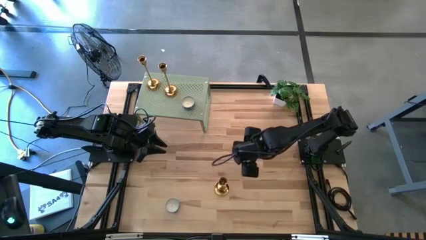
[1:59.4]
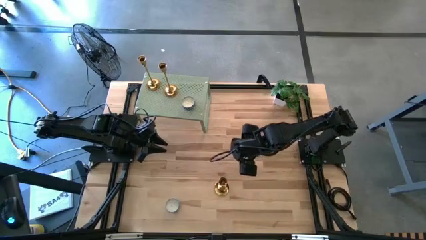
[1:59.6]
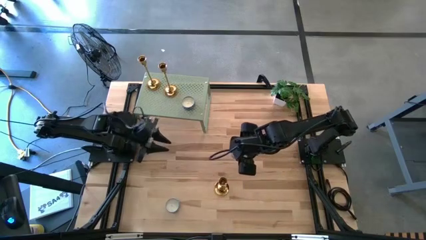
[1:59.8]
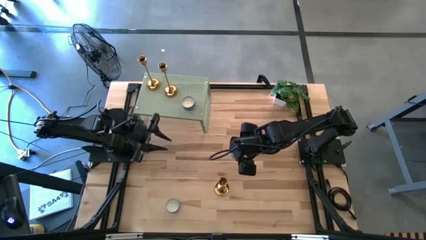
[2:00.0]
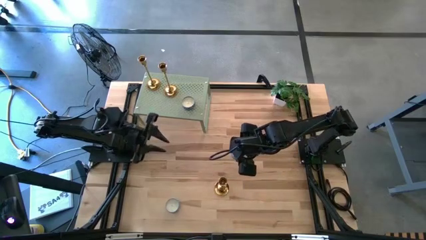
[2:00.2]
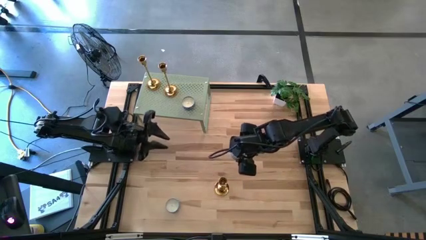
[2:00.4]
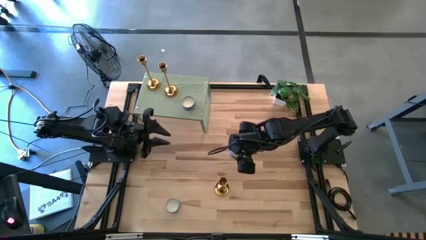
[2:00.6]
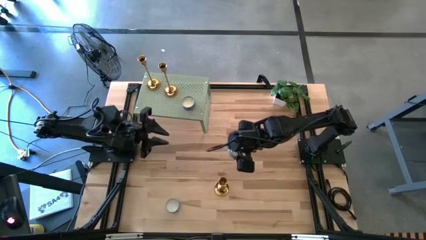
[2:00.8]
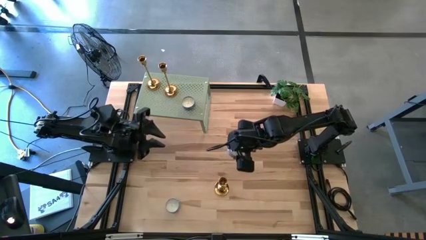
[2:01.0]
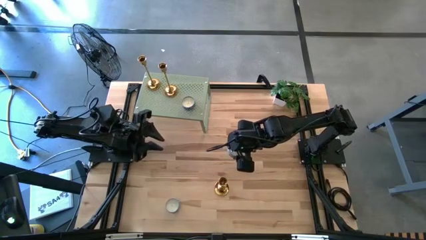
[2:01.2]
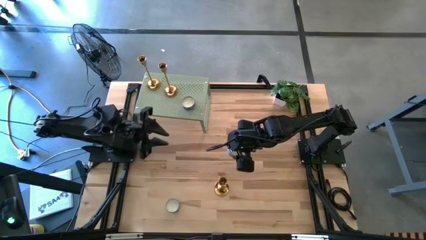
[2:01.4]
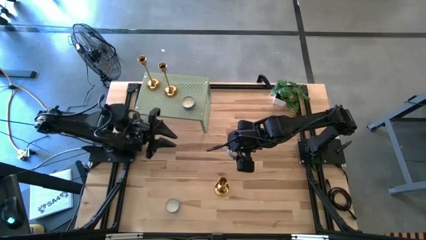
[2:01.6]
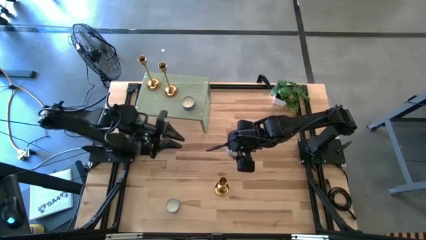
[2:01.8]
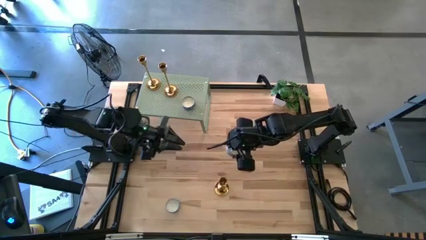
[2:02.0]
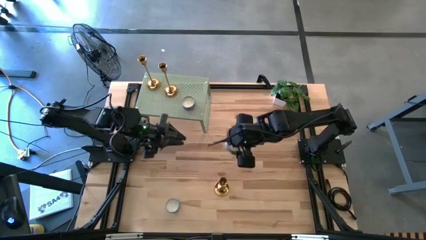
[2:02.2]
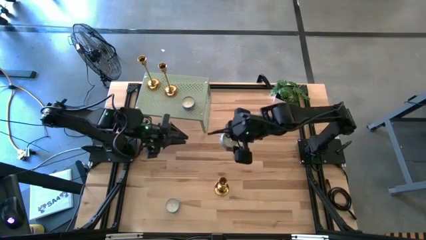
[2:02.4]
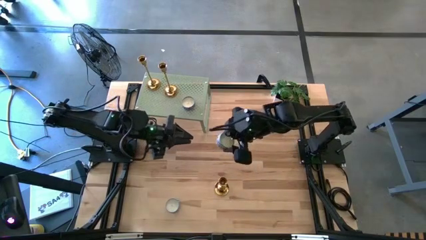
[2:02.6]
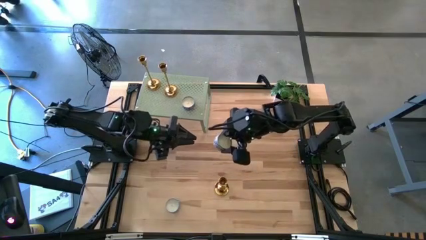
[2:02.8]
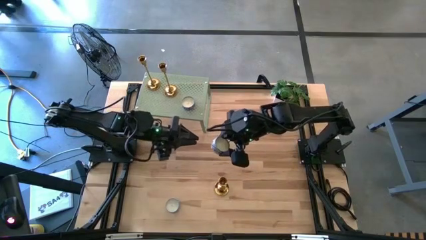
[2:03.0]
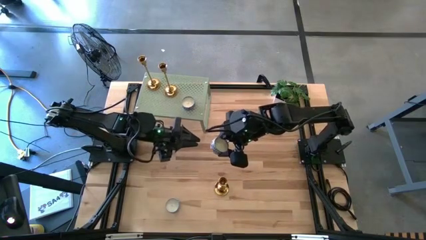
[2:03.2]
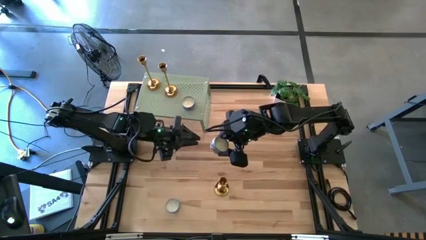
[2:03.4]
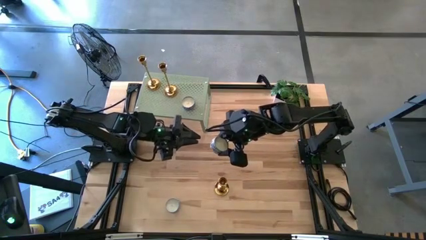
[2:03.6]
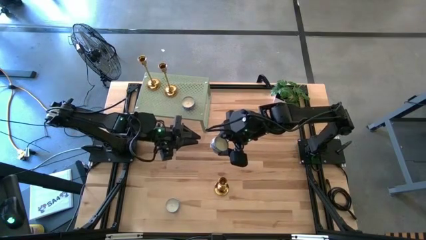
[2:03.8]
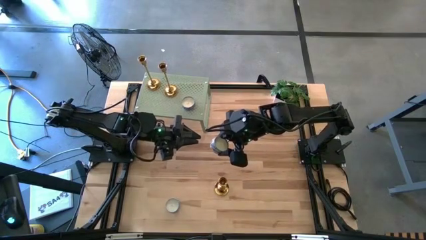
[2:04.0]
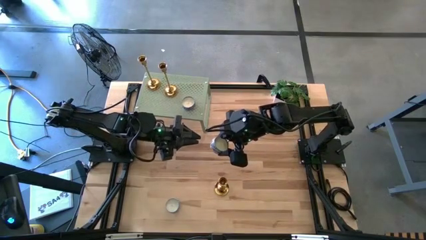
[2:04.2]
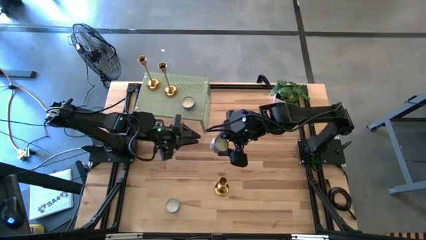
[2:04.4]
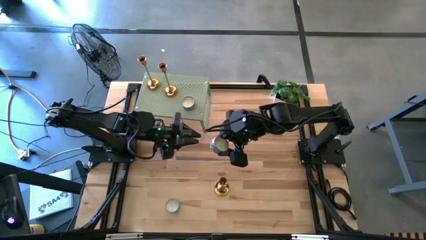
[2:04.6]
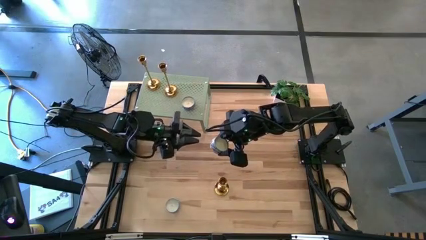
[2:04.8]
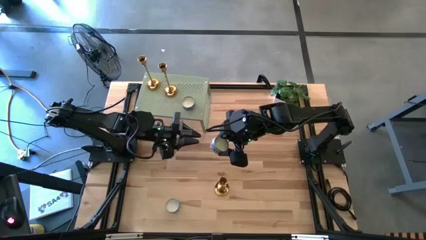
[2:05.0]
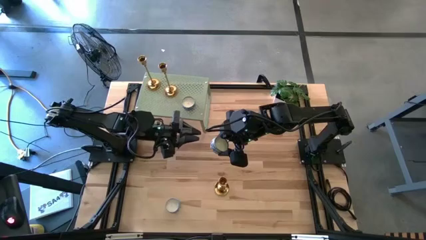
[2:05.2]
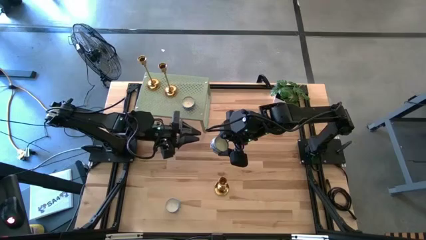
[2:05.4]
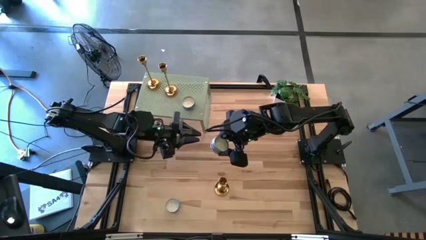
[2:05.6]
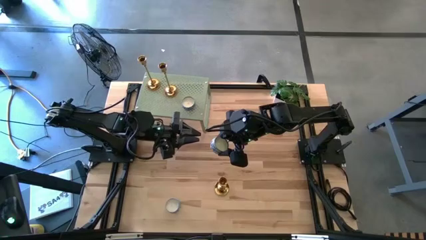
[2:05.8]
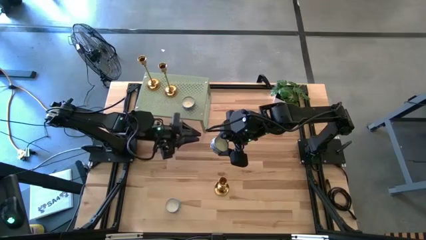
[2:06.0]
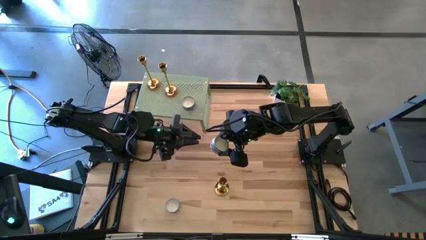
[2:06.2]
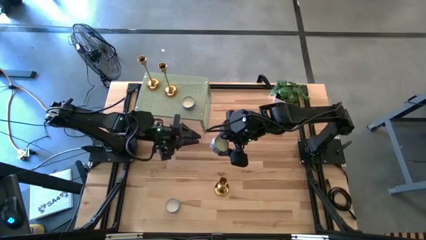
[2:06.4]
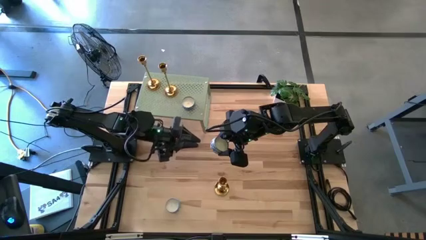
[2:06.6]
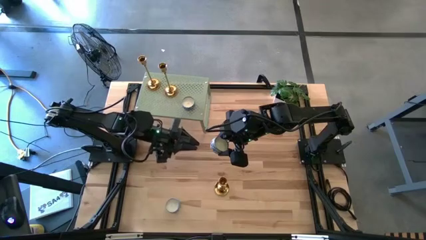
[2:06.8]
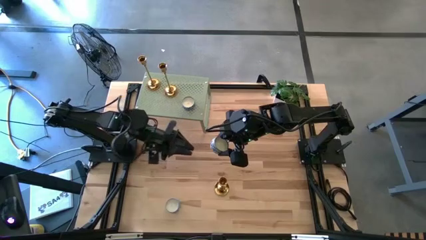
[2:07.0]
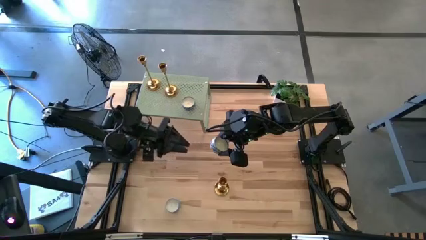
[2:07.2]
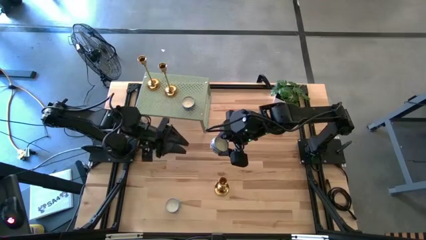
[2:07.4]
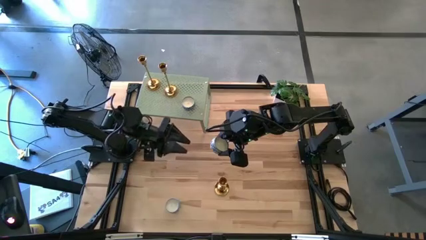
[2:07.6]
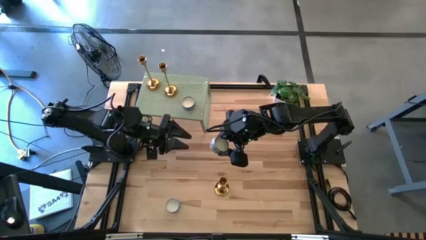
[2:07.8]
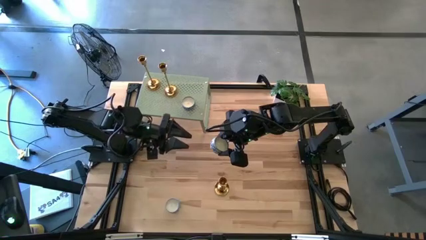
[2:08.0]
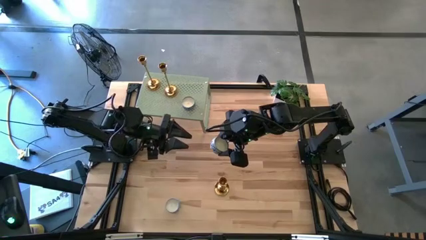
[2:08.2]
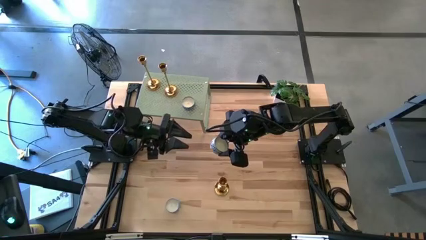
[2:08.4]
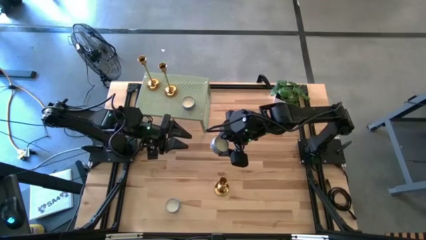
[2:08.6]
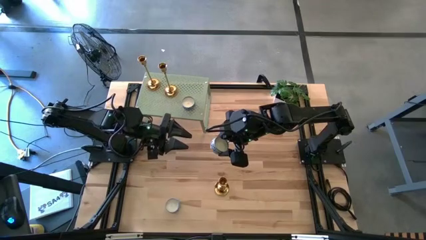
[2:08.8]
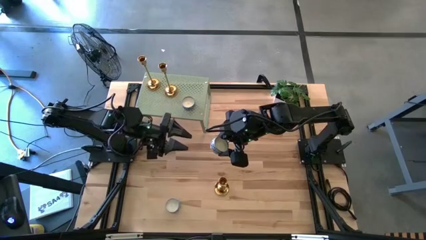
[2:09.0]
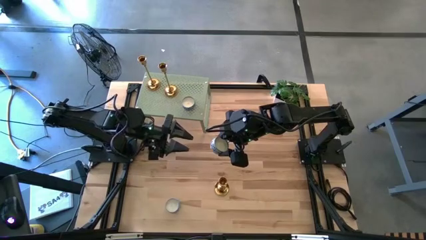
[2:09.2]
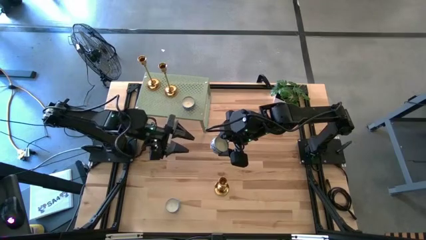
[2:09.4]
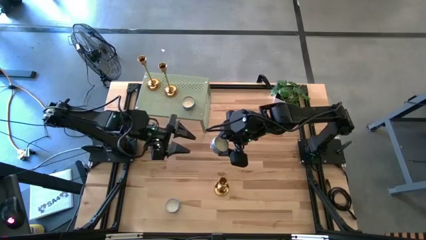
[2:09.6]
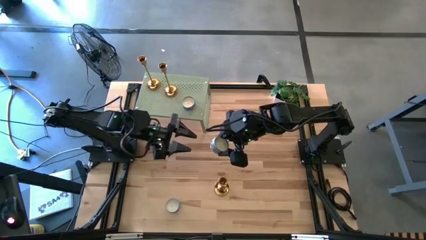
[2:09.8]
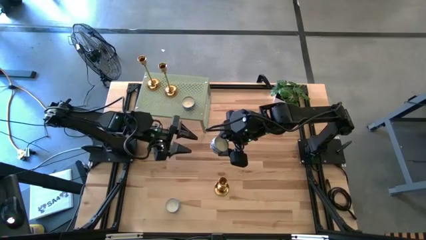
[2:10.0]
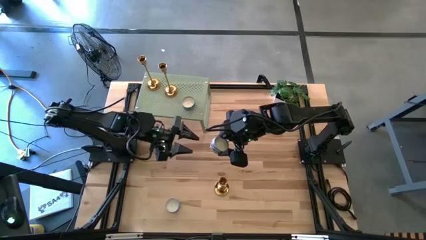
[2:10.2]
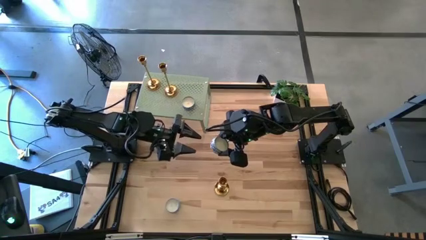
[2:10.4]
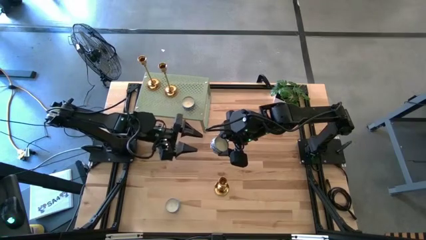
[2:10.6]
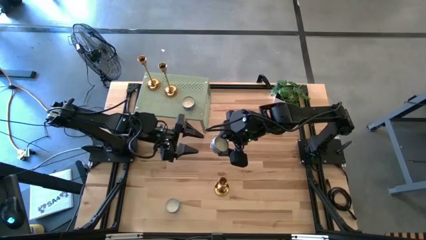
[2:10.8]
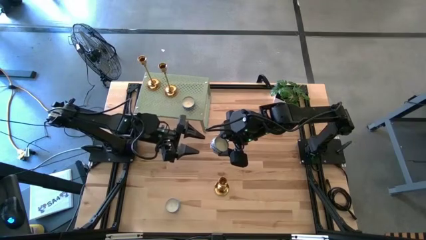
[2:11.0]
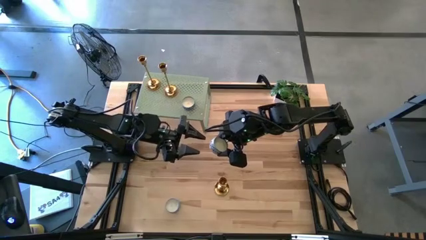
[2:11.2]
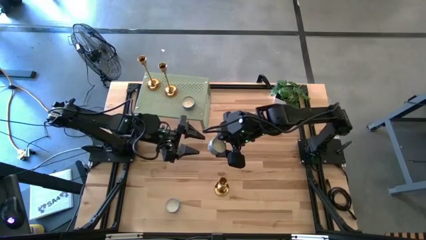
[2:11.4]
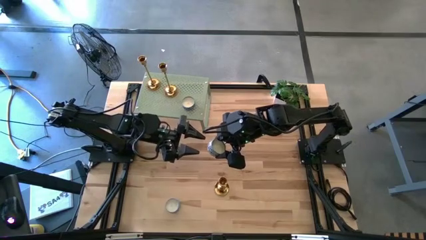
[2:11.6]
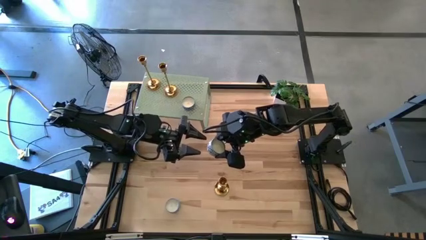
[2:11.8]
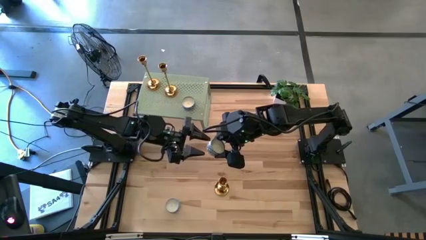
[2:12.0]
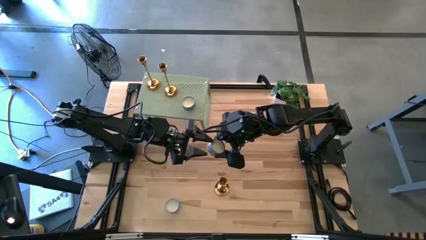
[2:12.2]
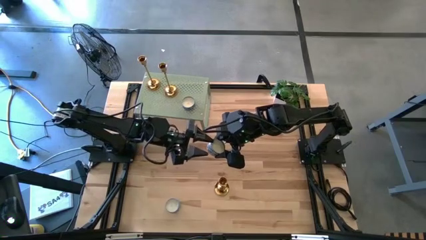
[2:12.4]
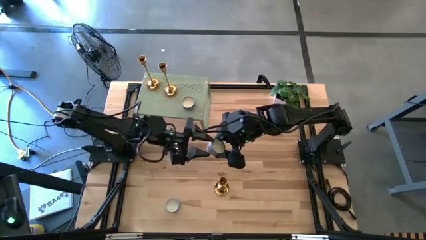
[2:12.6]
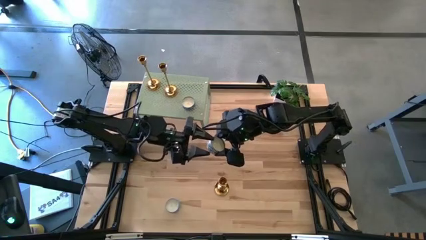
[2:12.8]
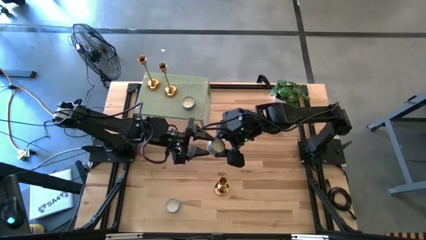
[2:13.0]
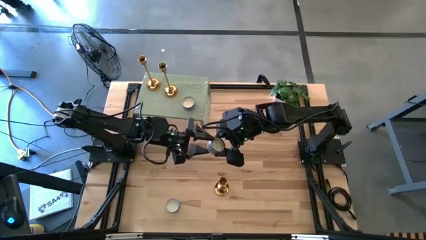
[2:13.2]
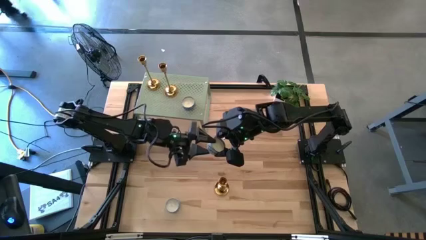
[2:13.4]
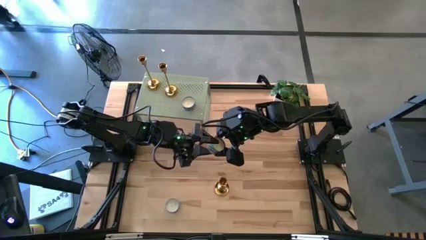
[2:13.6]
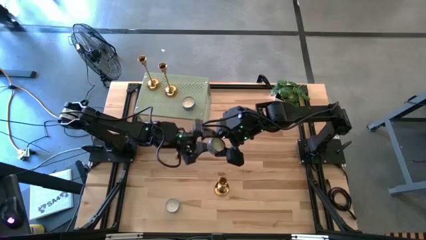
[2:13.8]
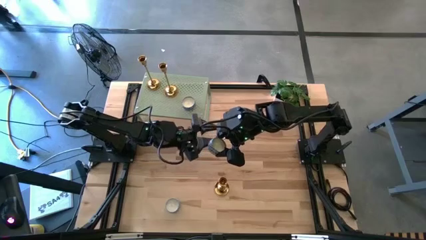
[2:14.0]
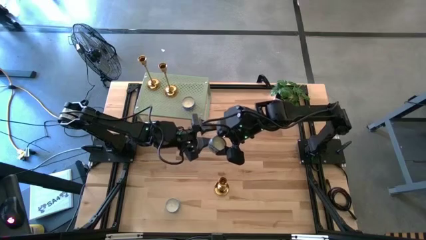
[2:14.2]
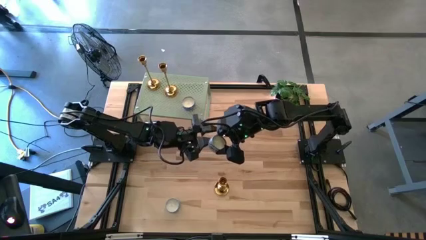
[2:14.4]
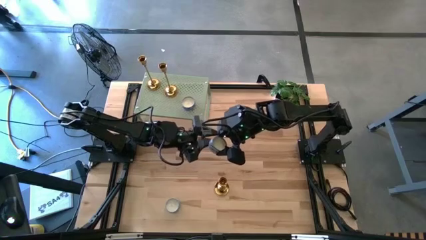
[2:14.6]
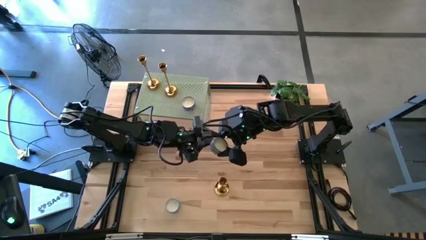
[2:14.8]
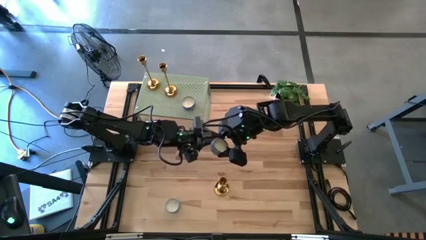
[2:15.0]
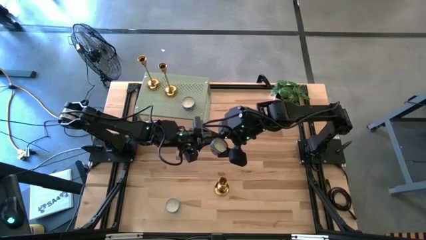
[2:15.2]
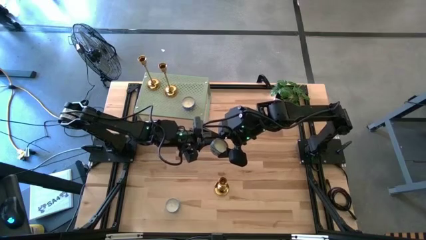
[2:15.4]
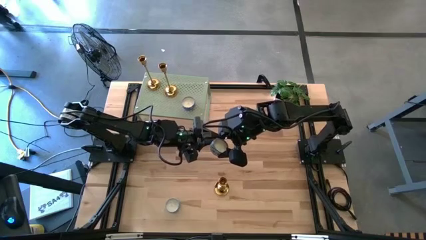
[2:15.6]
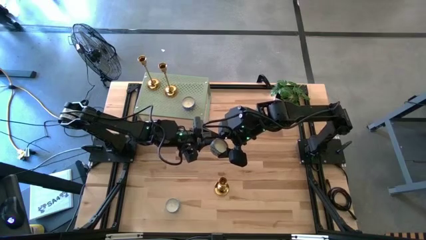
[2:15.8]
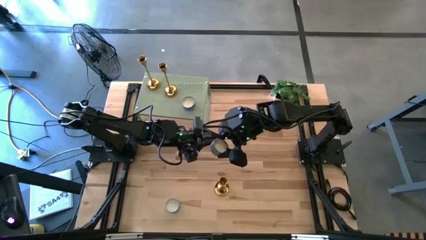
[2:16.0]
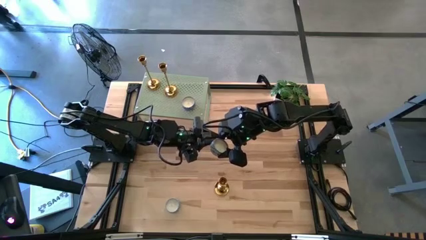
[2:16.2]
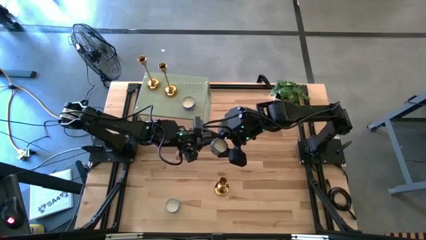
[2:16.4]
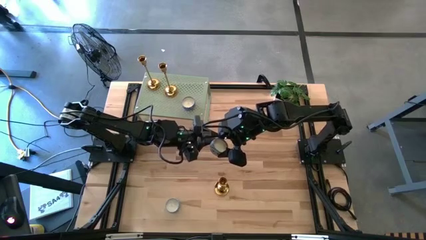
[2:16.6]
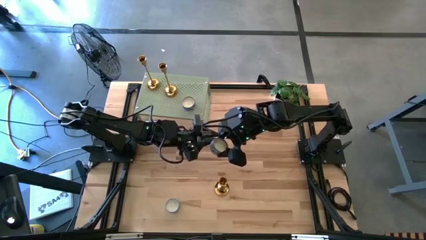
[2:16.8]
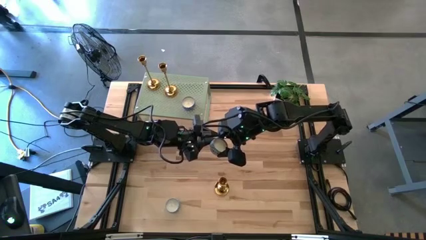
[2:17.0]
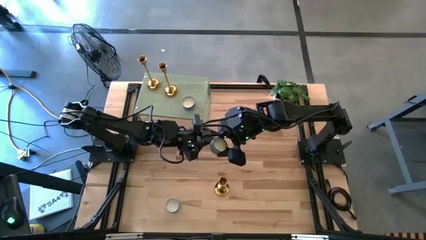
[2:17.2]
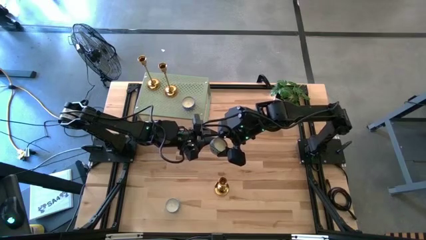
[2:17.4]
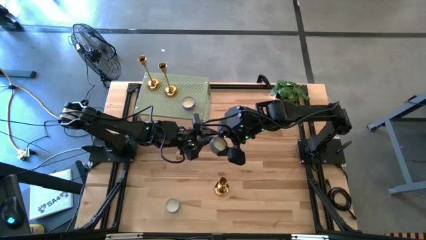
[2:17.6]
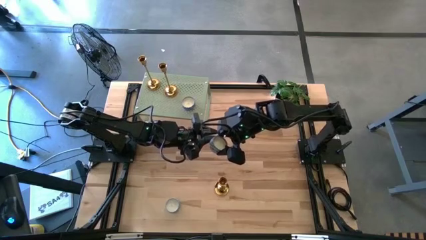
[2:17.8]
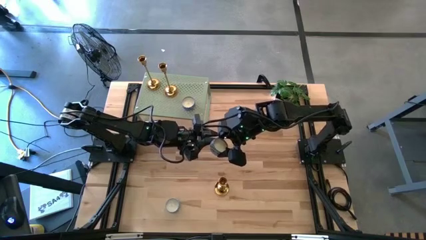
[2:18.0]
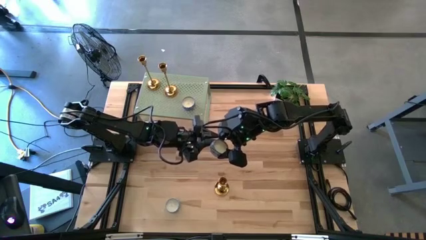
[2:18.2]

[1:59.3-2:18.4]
Task: Pick & Place candle stick holders
Put the right blue patterned round candle on the shelf
